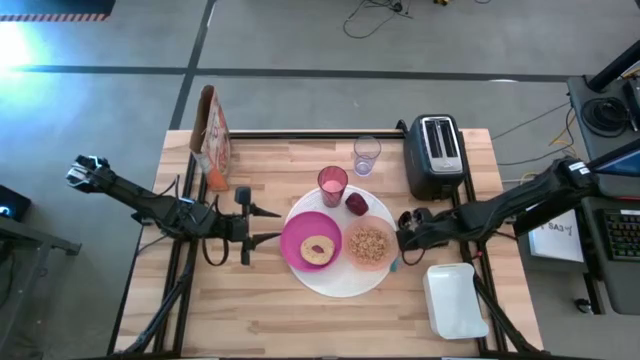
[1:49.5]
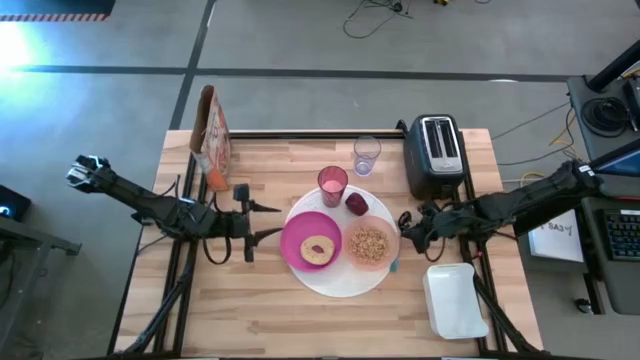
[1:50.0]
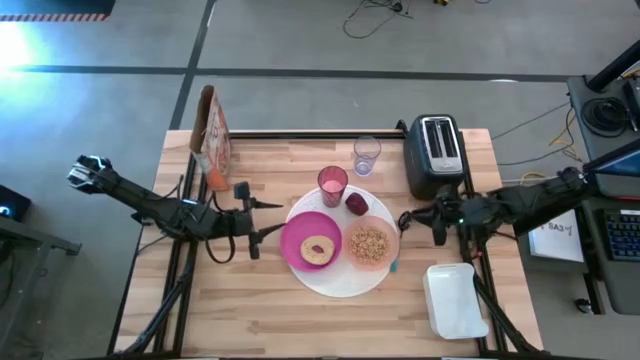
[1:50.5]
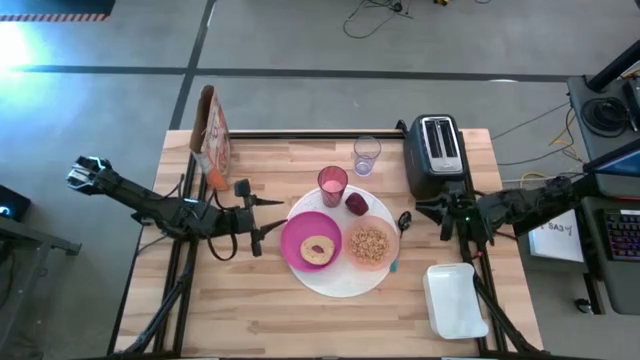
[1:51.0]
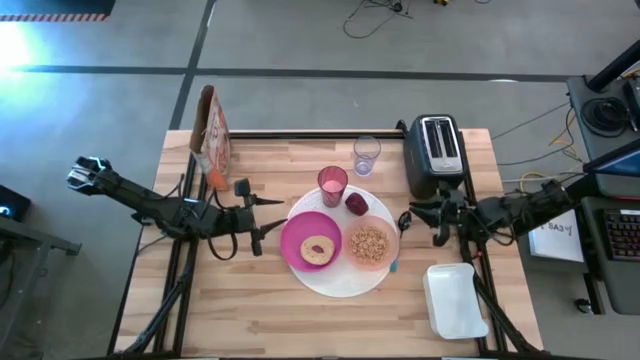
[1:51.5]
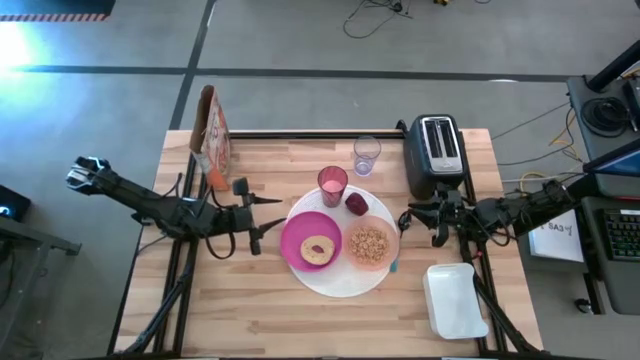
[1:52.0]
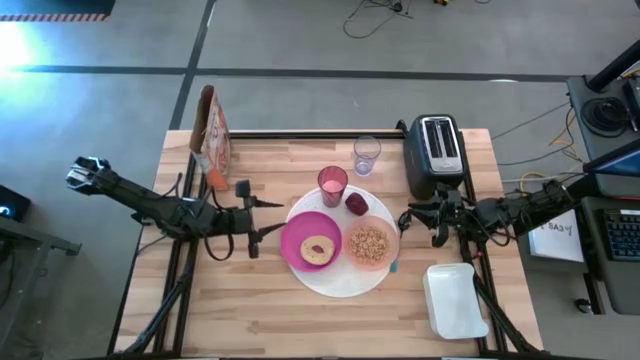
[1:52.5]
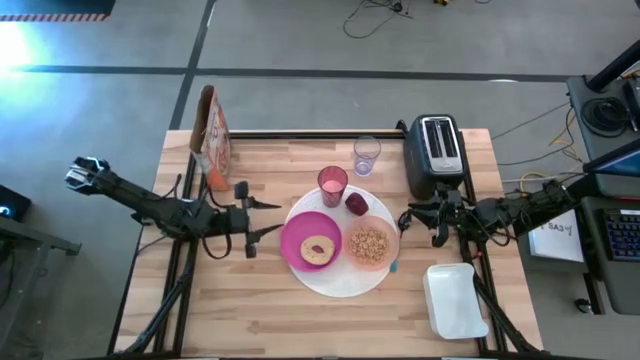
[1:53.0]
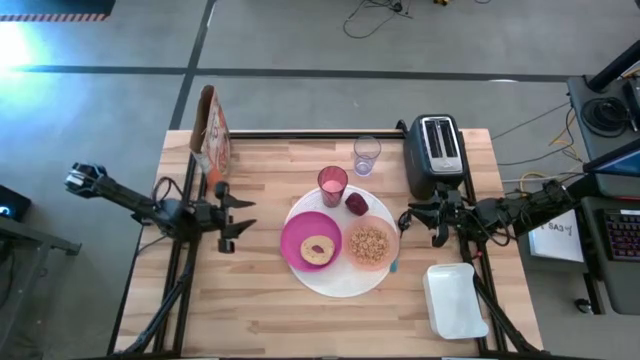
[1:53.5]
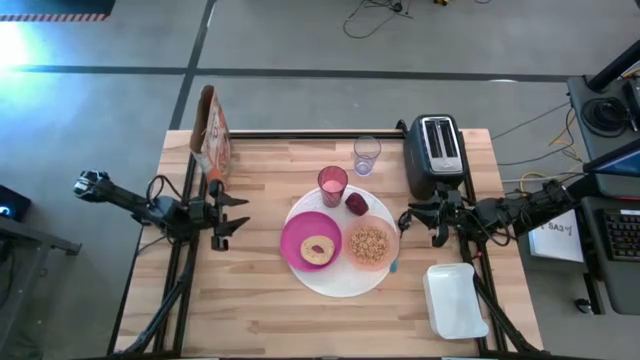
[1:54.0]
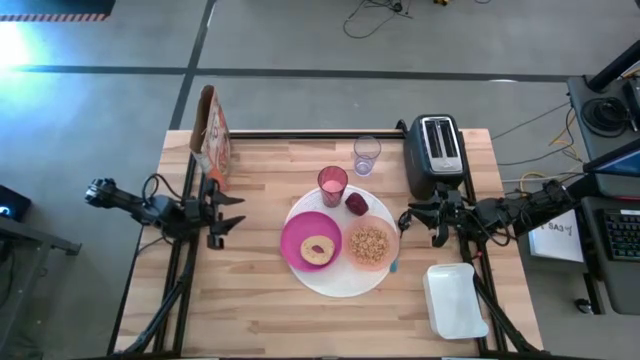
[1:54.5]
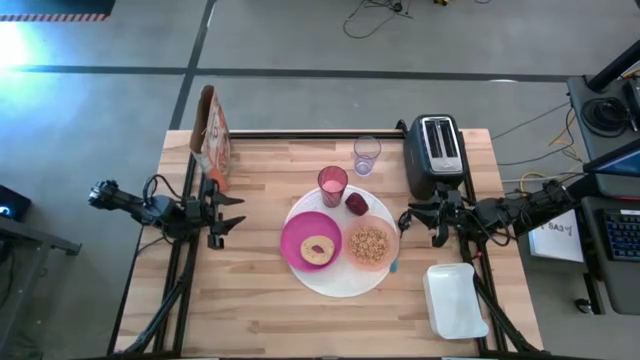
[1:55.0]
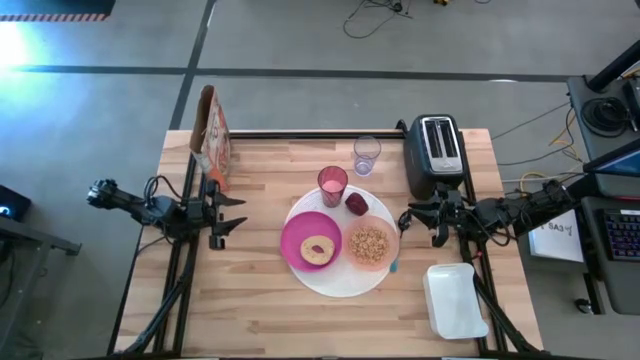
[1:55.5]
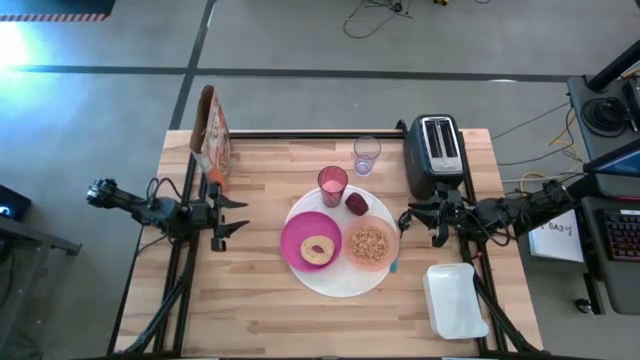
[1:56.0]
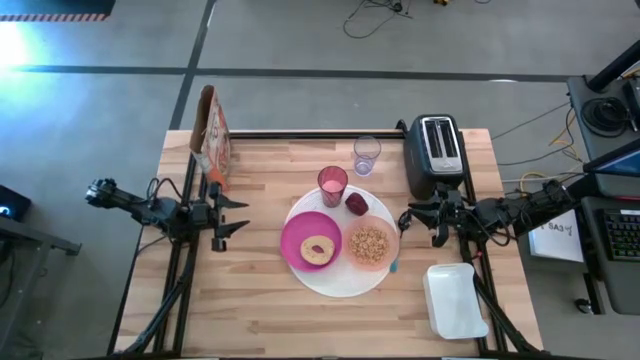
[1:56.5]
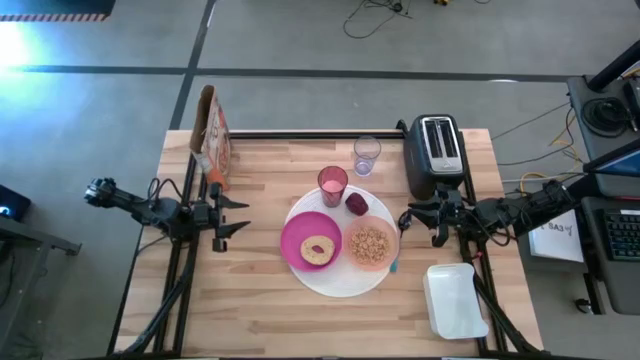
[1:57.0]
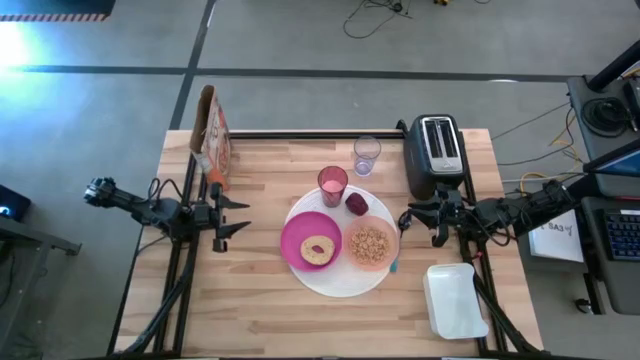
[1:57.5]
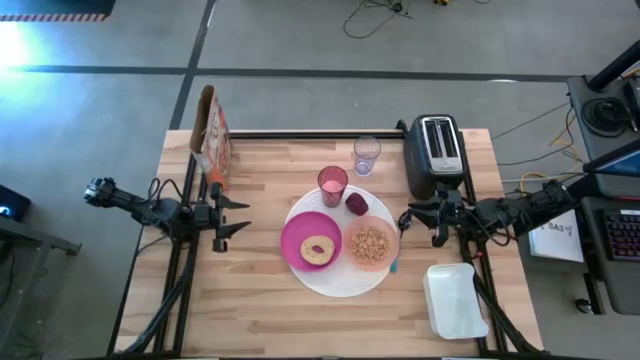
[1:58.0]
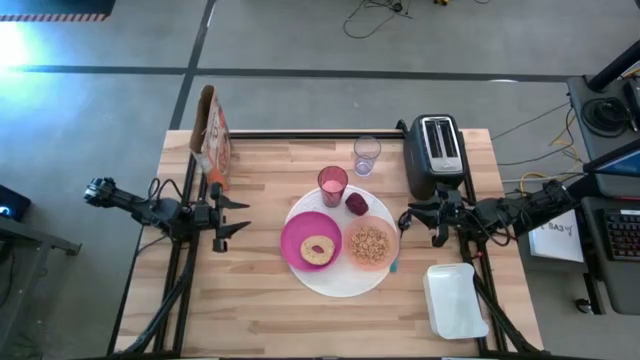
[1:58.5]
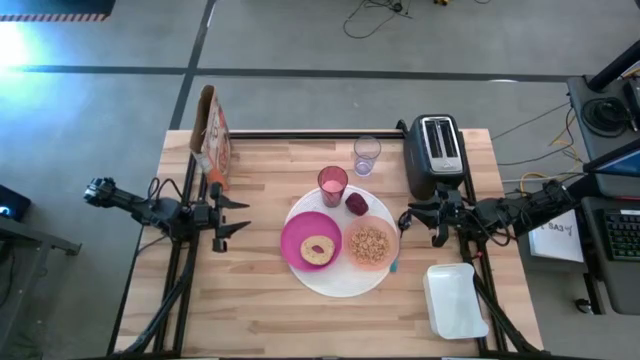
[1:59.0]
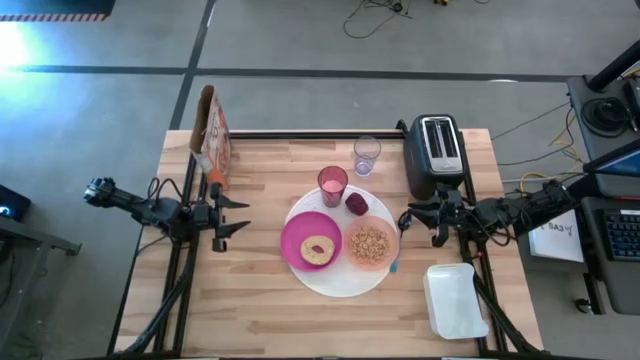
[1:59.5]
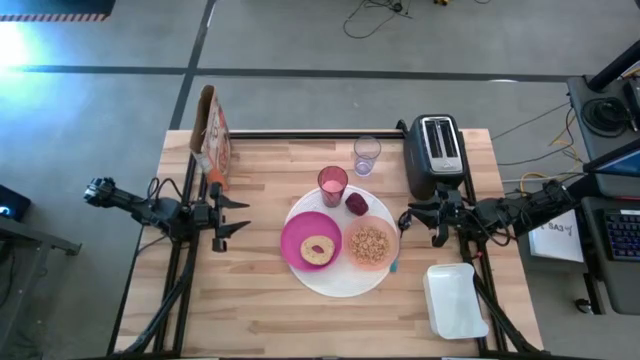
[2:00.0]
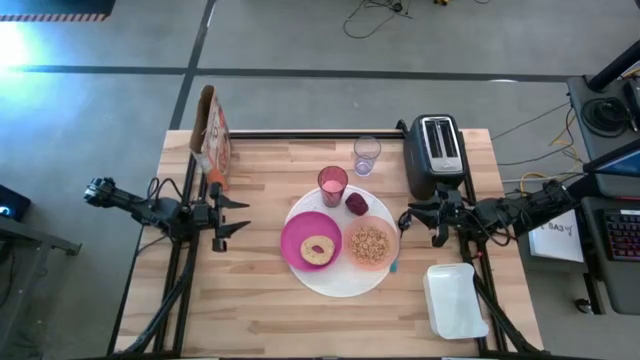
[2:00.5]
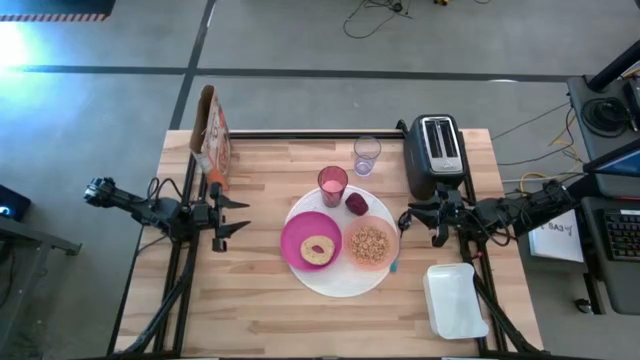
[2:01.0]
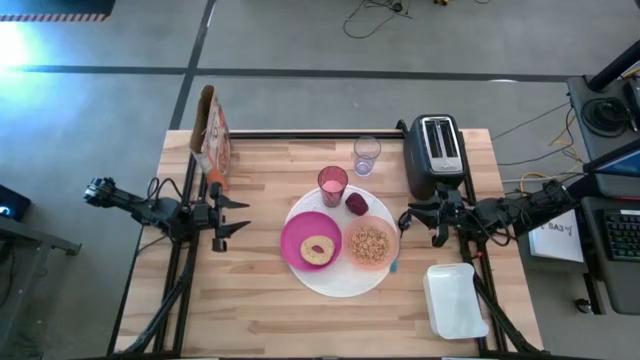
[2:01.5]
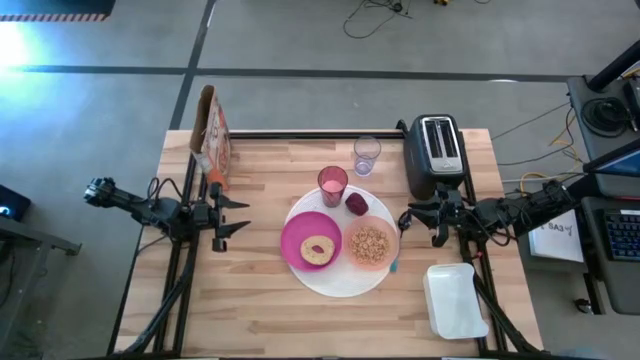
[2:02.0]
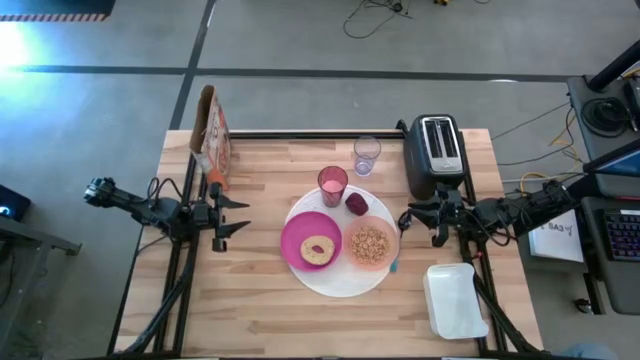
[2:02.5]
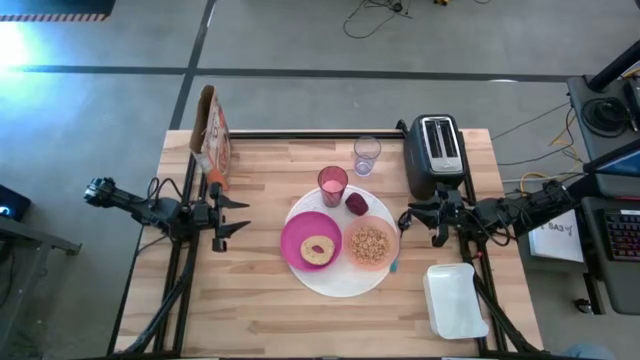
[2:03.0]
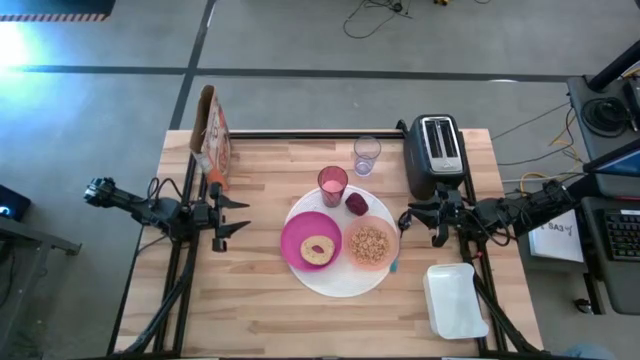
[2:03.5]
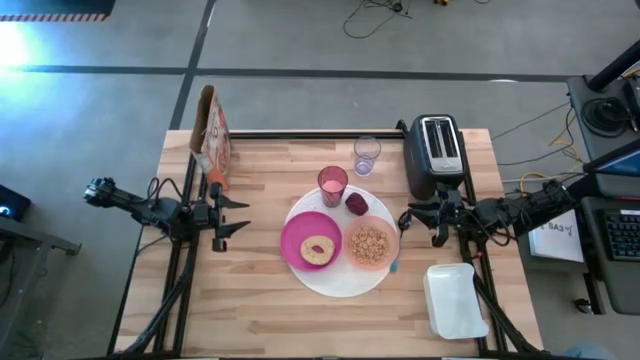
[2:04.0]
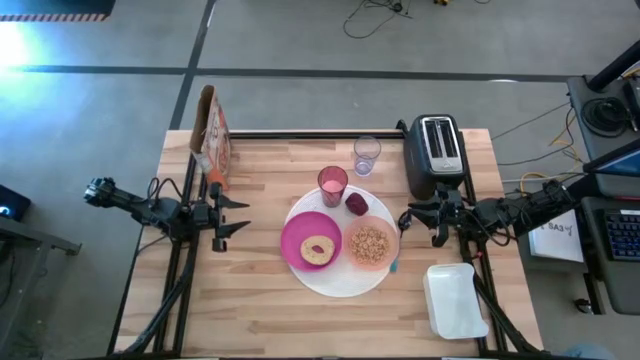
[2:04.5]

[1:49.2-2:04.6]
Task: Arrange a breakfast setting
Return to Home Position
